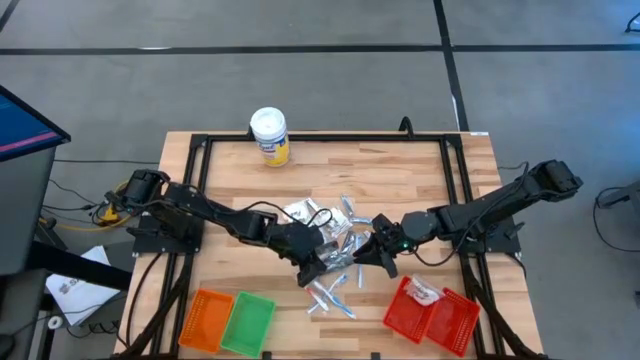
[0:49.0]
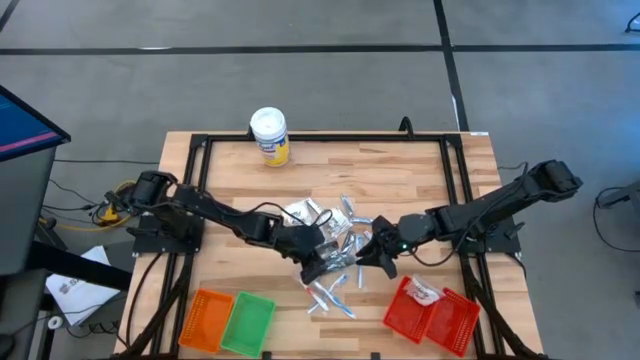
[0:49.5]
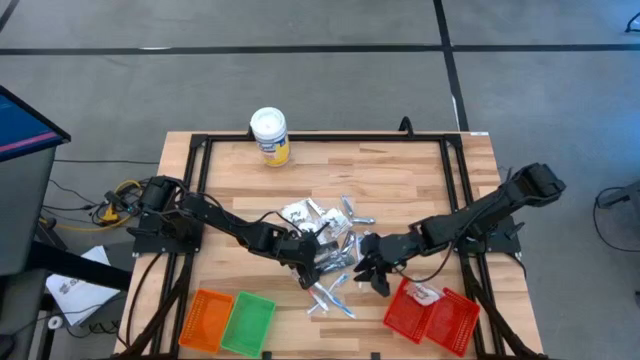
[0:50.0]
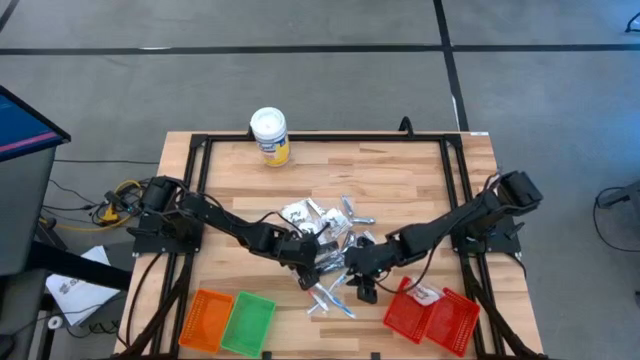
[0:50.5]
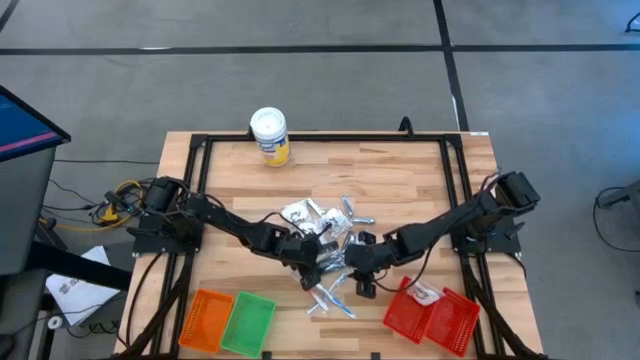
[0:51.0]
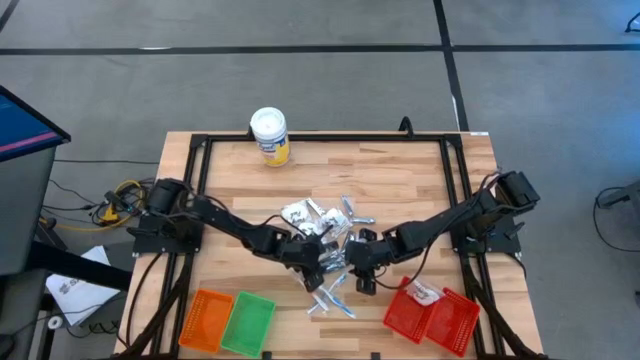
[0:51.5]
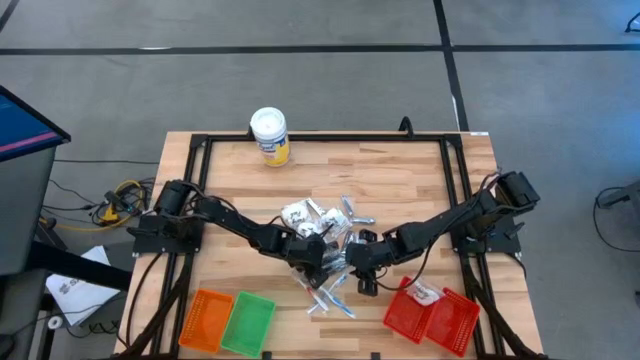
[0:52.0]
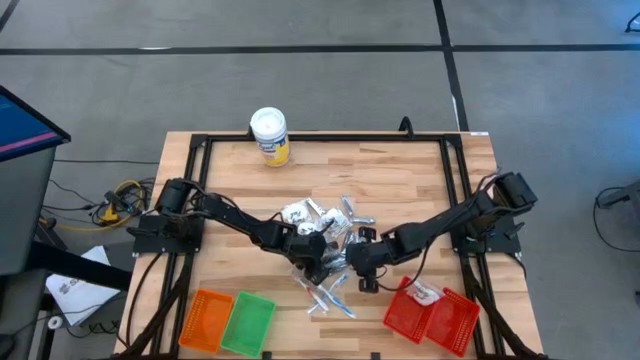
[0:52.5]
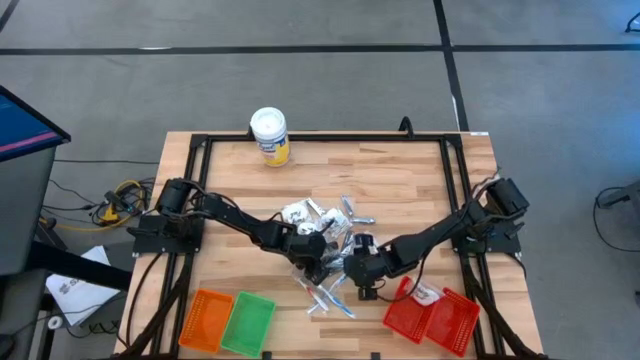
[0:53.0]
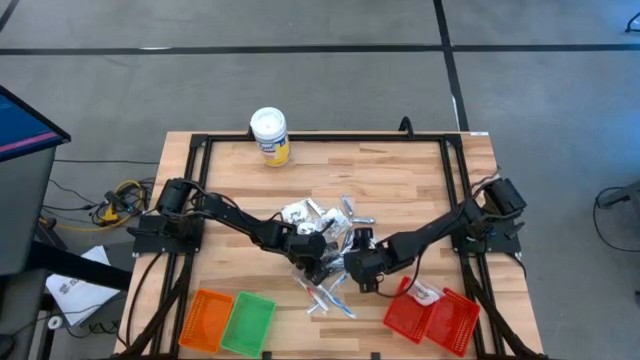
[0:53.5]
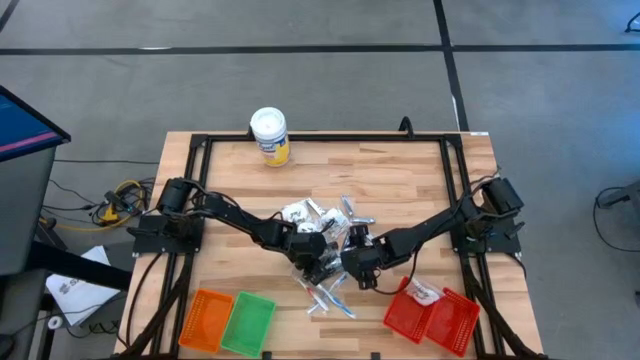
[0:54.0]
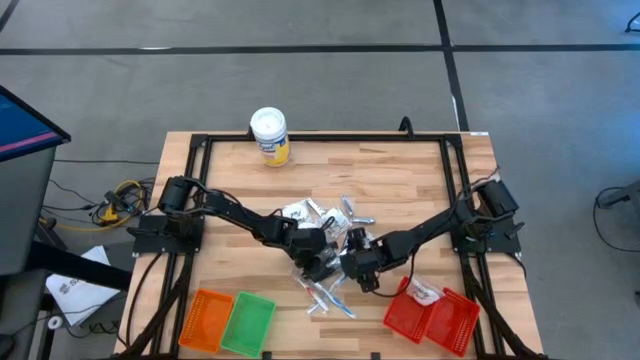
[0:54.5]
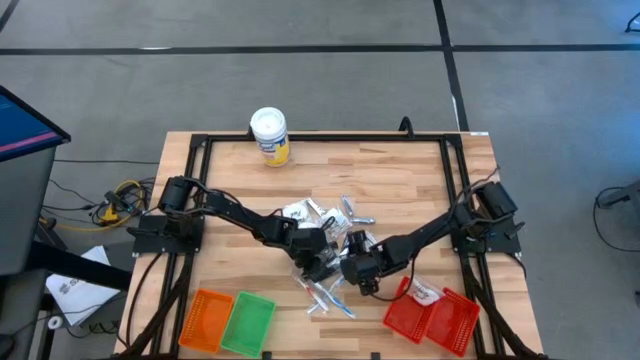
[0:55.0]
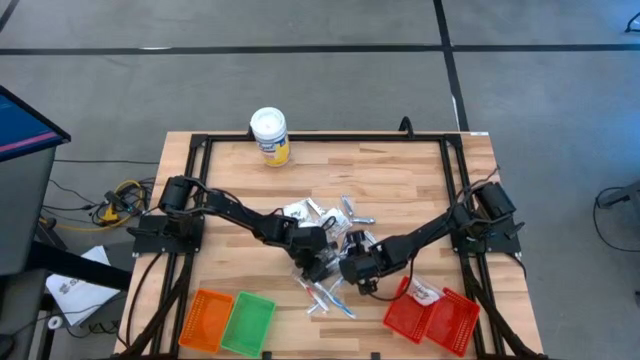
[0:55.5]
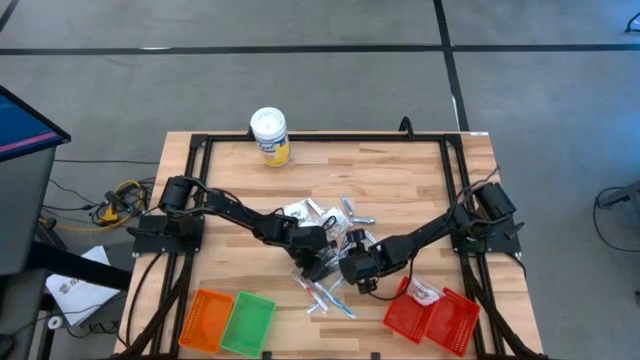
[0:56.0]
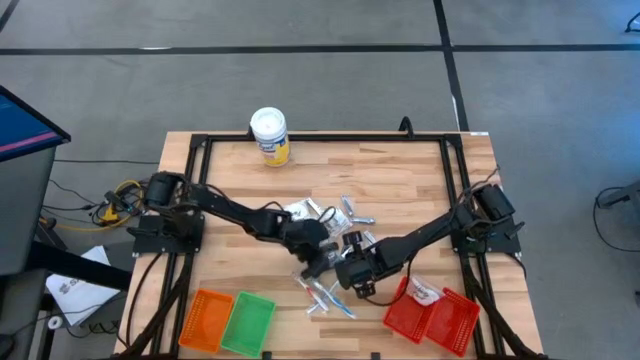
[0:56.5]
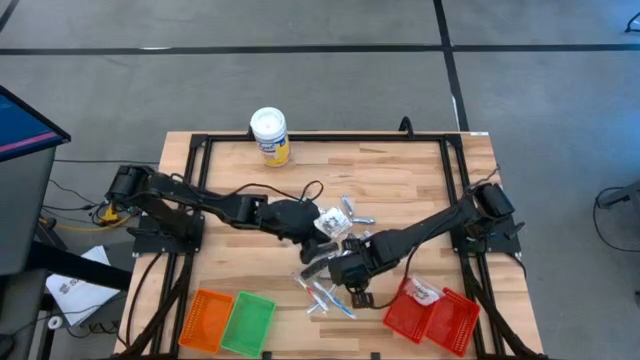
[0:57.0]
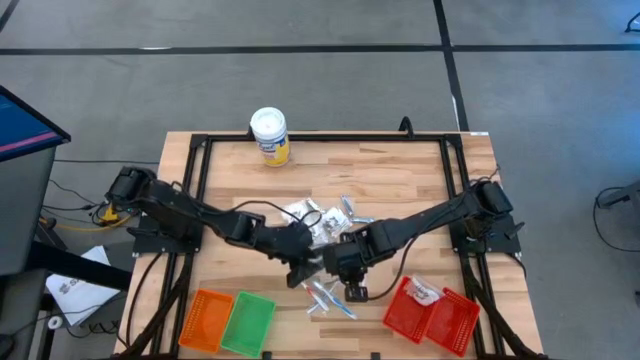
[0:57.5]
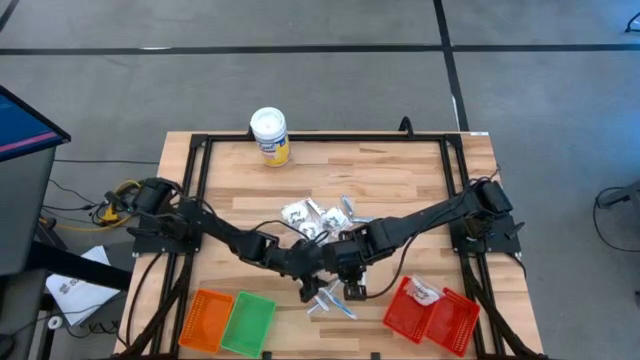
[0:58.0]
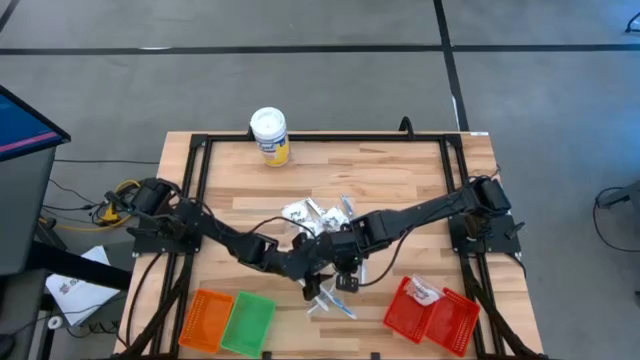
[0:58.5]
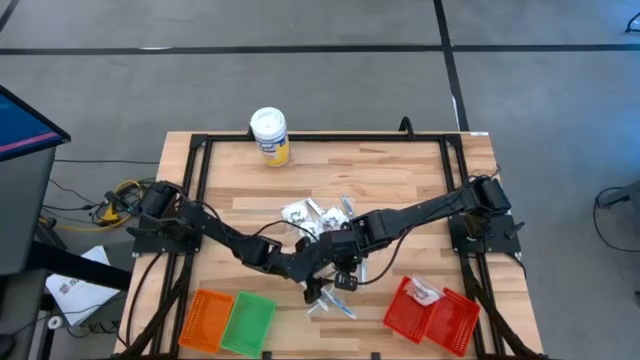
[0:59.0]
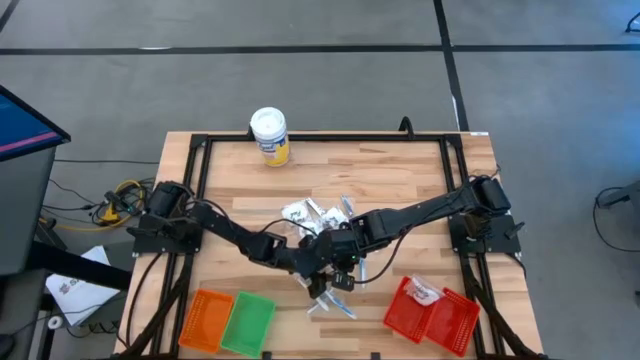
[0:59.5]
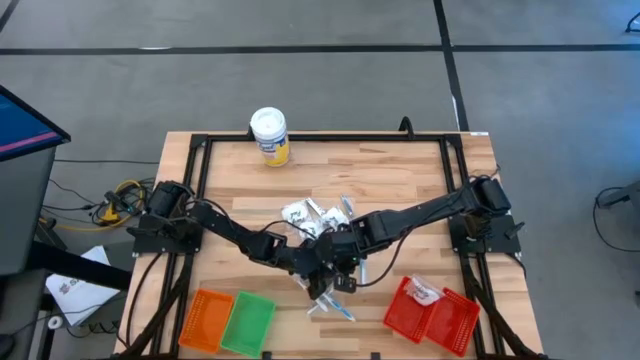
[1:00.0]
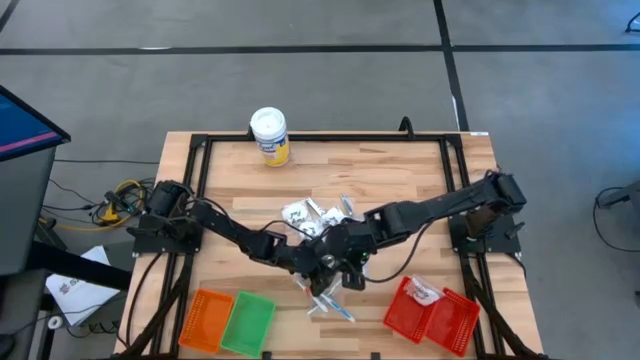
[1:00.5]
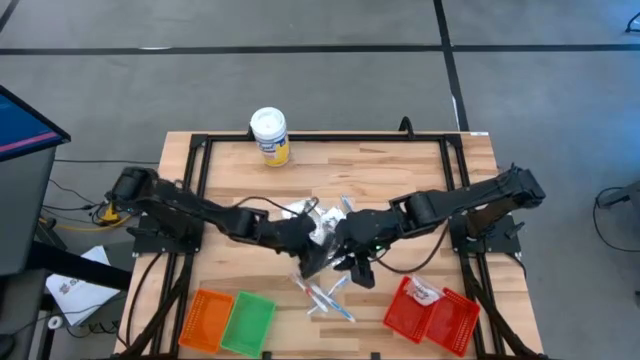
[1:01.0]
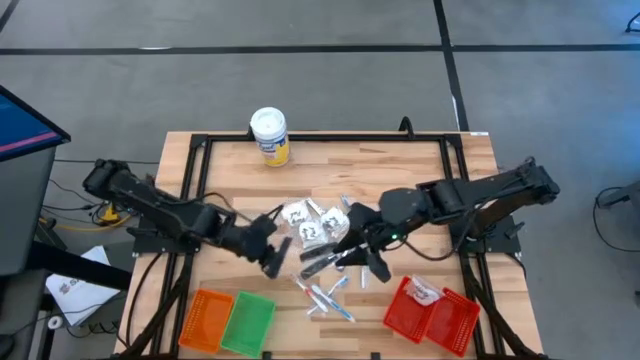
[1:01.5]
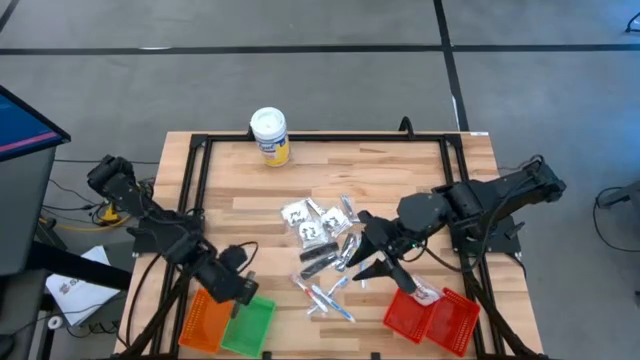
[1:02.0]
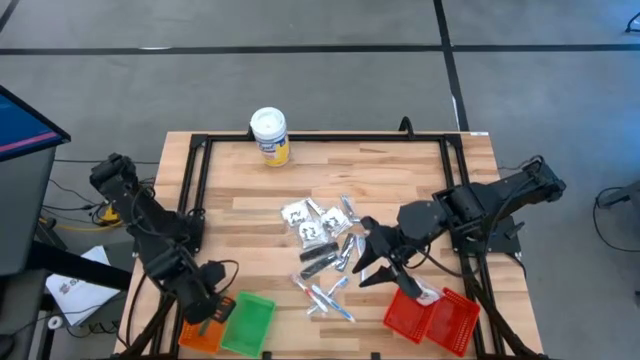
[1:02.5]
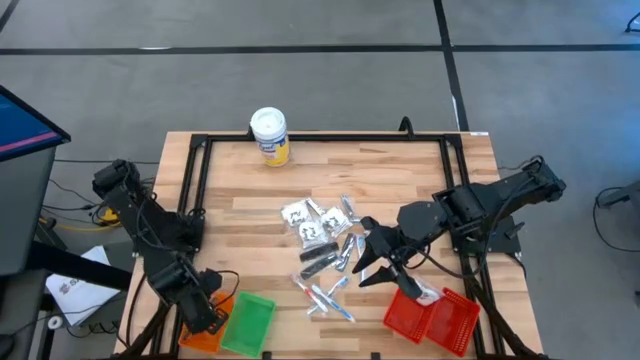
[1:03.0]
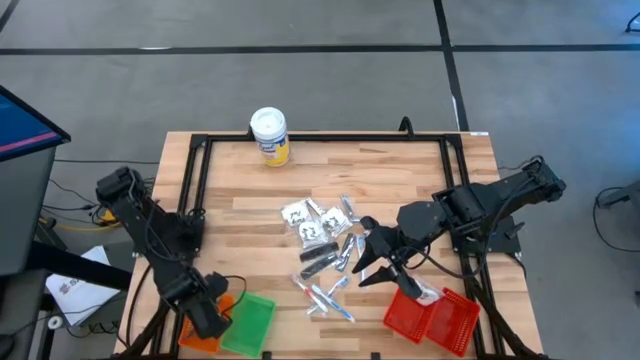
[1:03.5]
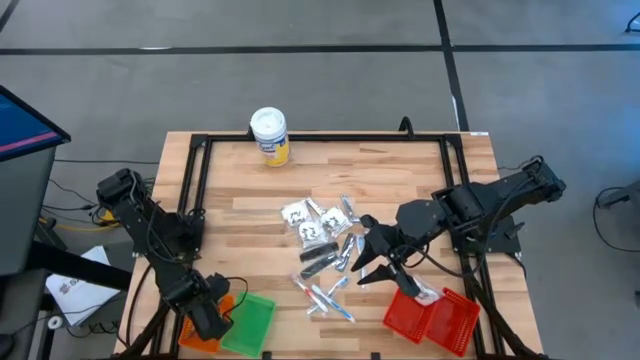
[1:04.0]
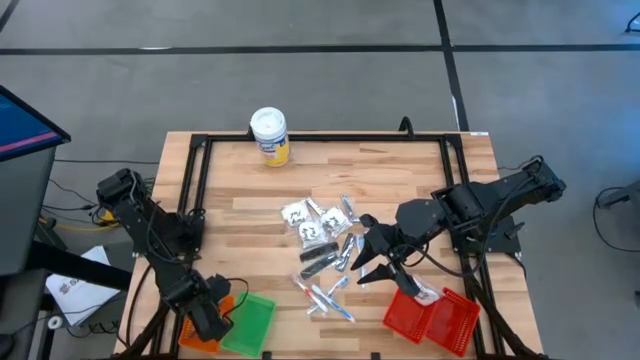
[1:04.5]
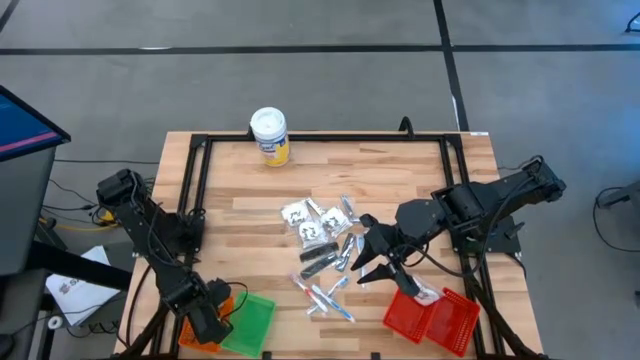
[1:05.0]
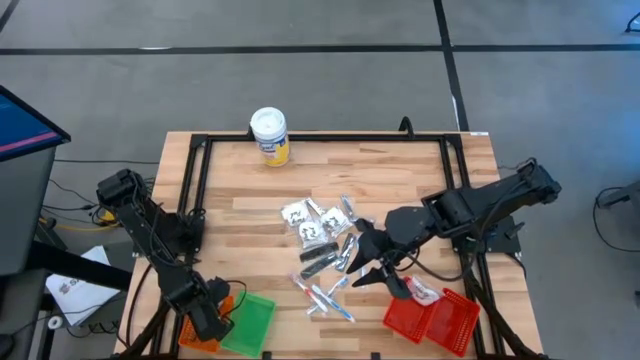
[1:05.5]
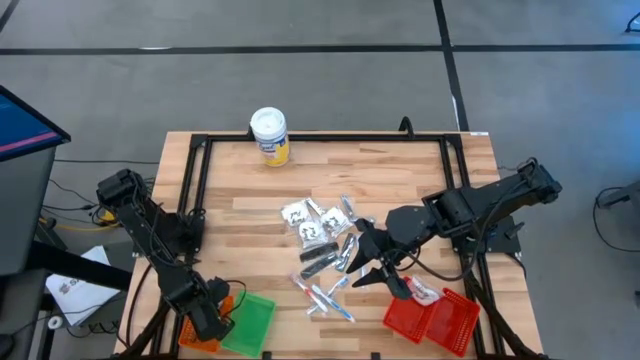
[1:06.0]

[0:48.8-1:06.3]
Task: Pick & Place Travel size toiletries
Put the black comb into the orange basket
